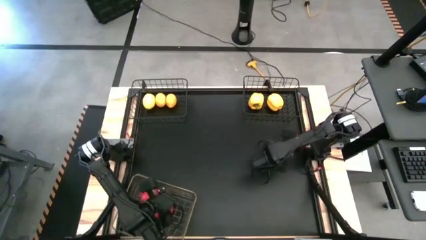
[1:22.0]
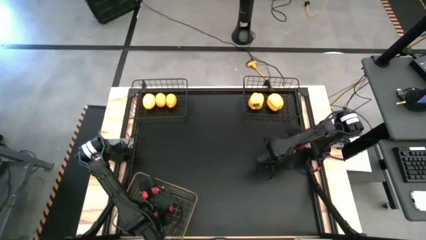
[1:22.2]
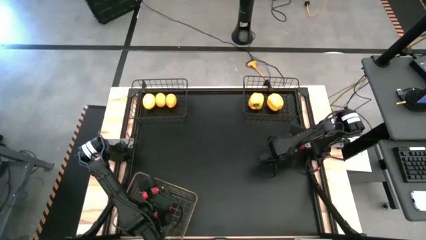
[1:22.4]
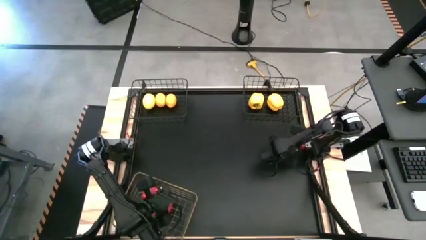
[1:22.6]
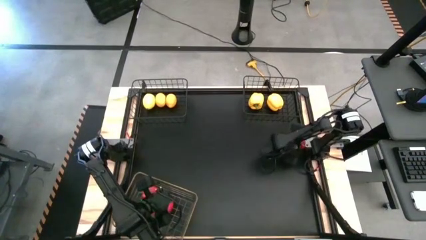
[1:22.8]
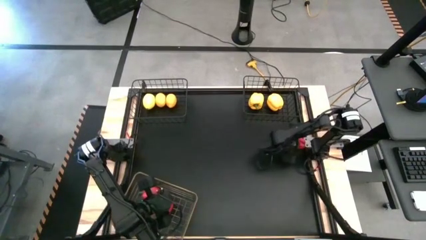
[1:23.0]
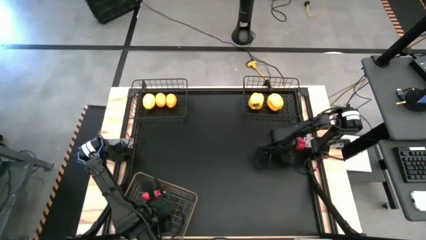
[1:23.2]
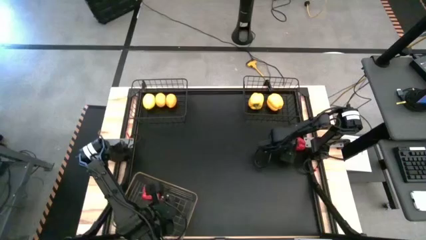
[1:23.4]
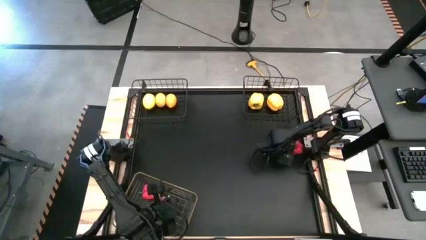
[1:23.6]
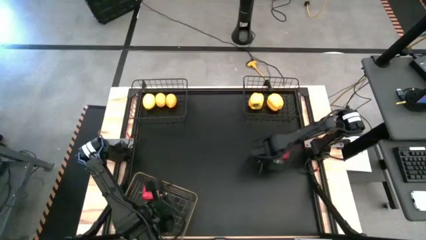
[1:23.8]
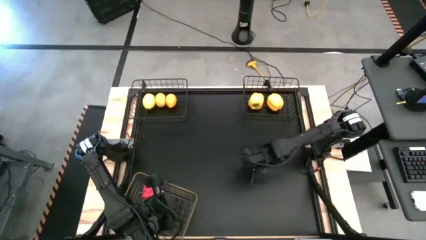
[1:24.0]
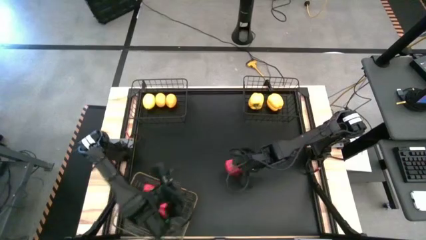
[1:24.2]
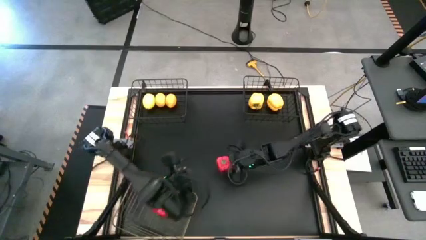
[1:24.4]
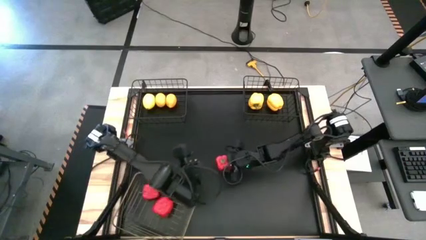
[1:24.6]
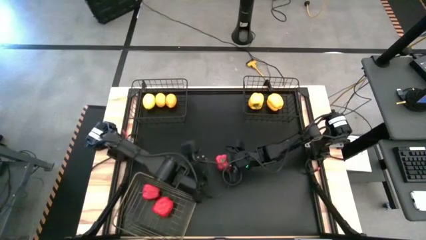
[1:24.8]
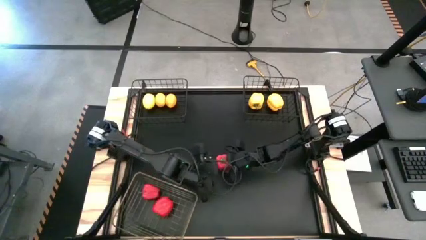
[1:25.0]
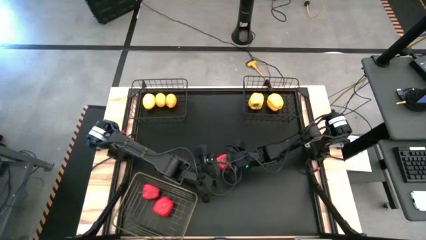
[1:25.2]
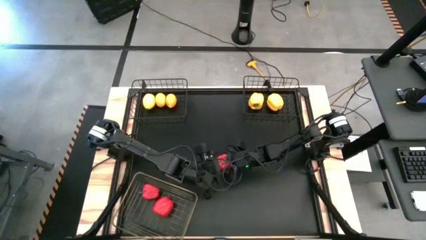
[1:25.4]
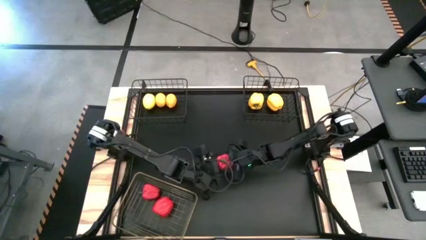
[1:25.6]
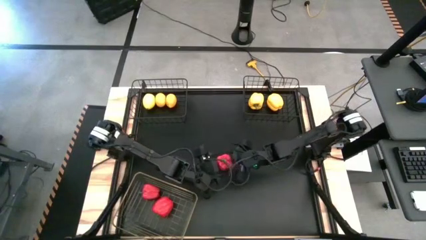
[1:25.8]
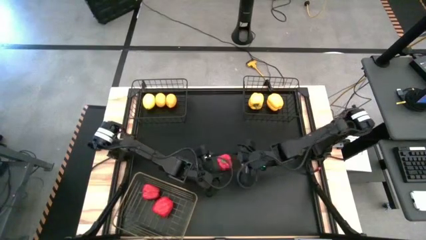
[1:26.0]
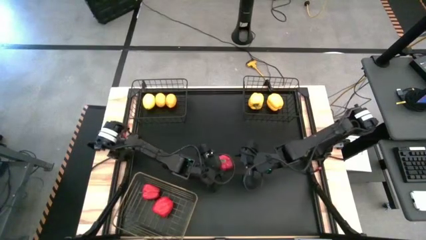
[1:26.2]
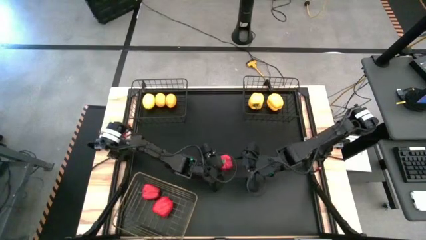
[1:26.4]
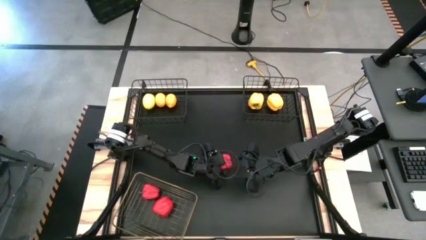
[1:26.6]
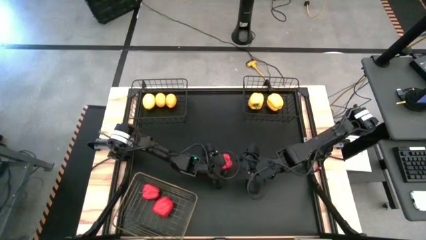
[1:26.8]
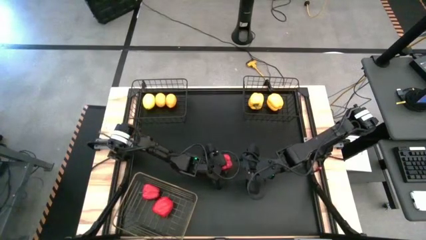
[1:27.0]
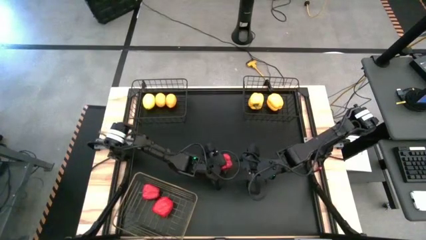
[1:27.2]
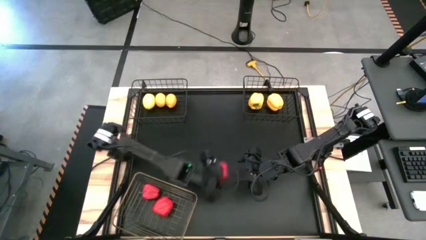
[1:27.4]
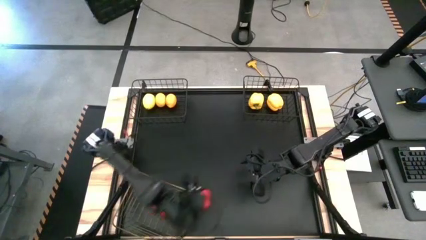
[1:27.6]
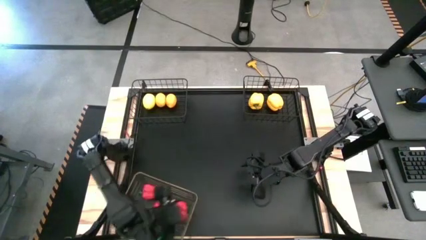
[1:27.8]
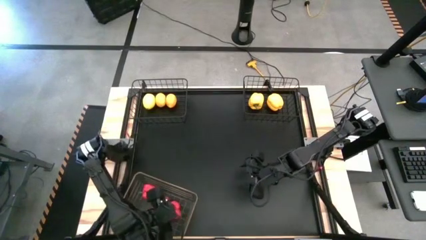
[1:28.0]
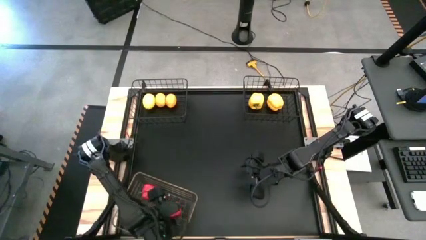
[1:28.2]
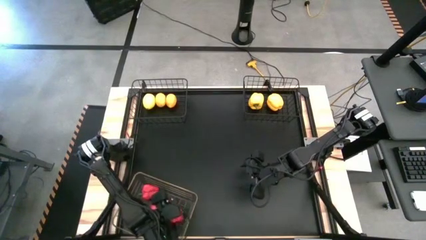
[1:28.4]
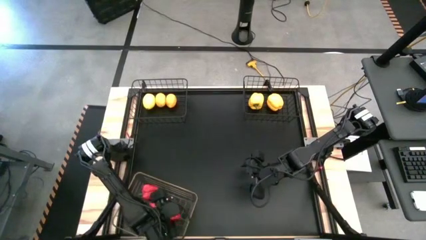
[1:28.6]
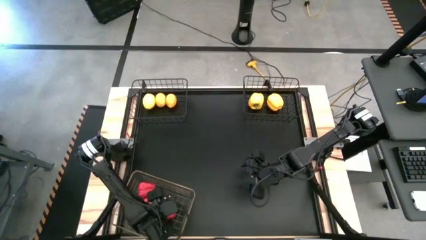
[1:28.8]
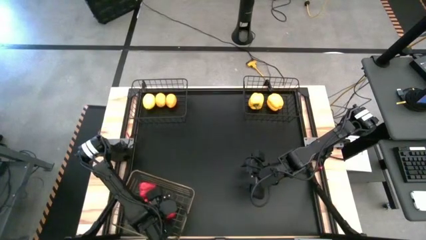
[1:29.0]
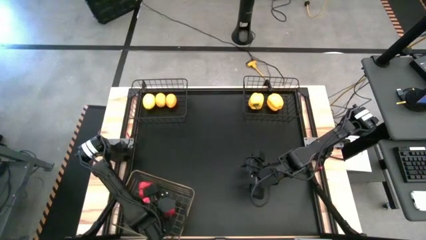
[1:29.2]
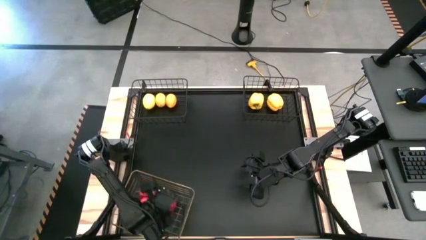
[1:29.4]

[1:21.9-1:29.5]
Task: Sort produce into baskets
Put the red bell pepper into the gold wire basket

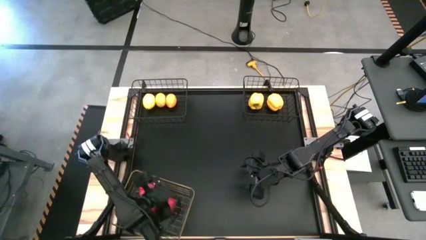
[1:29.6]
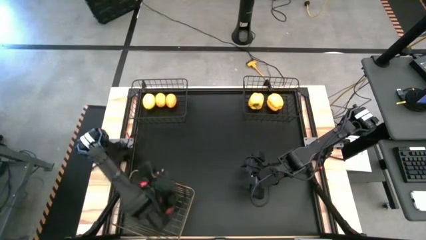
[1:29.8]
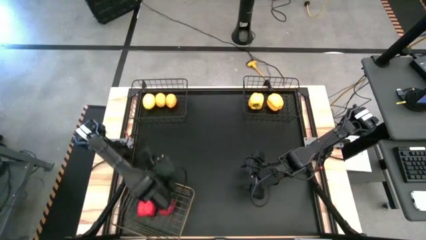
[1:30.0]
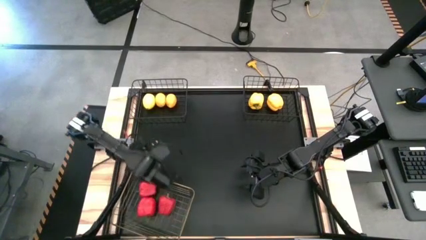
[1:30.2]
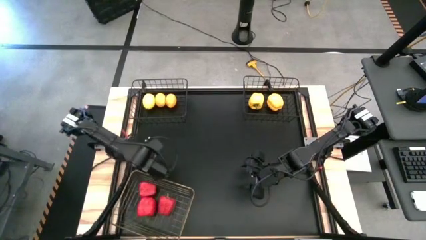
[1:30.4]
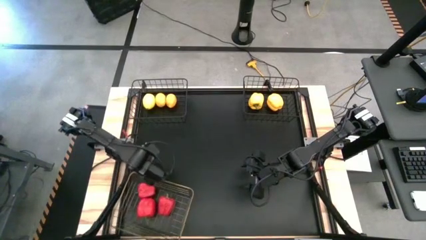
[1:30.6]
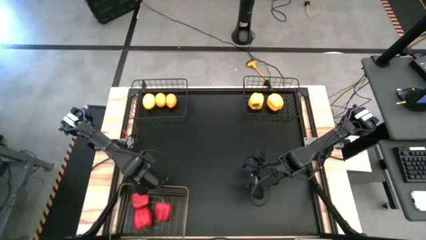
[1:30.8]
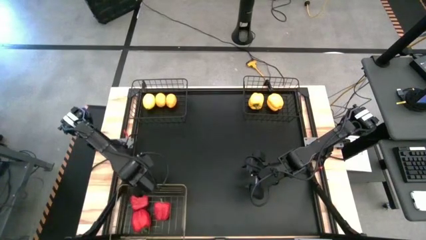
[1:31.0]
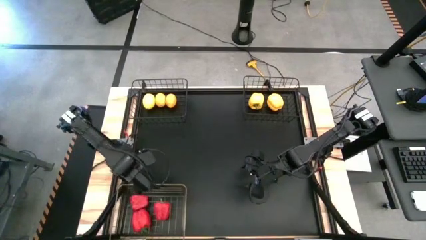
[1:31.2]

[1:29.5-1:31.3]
Adjust the gold wire basket

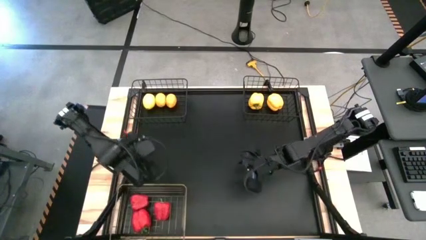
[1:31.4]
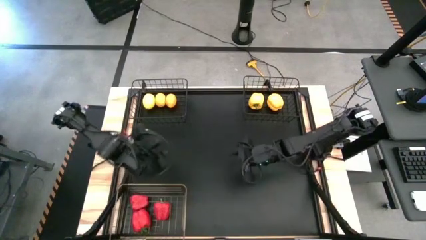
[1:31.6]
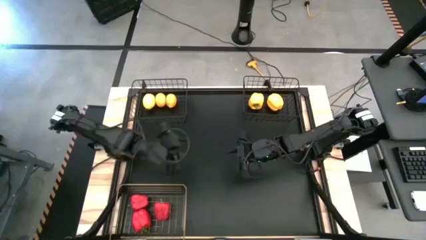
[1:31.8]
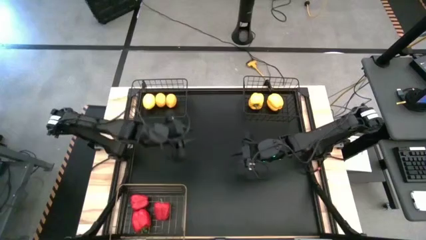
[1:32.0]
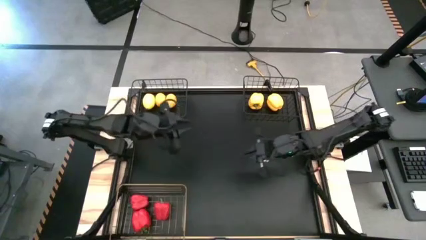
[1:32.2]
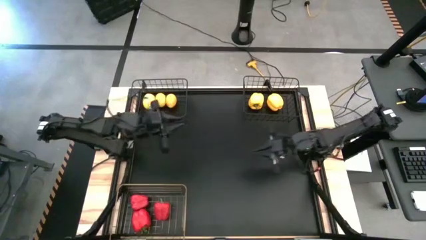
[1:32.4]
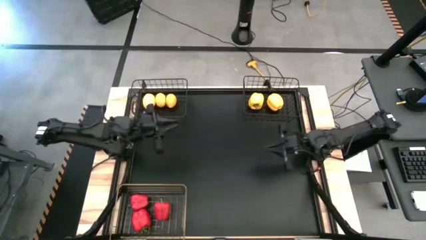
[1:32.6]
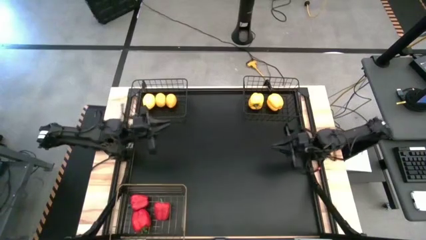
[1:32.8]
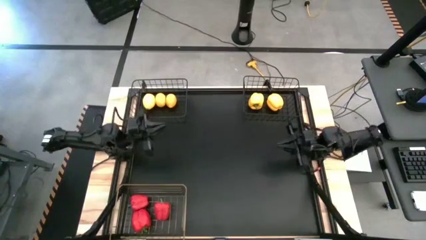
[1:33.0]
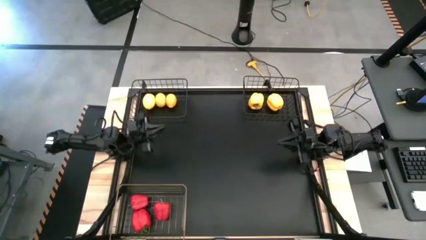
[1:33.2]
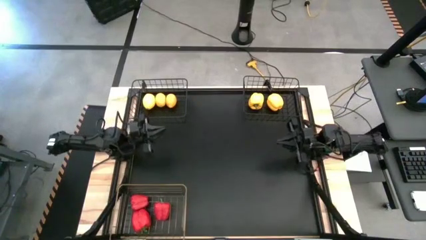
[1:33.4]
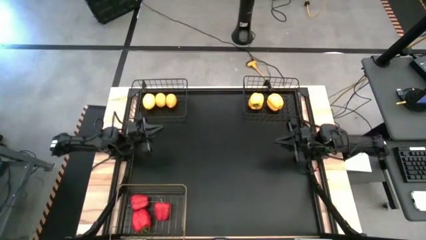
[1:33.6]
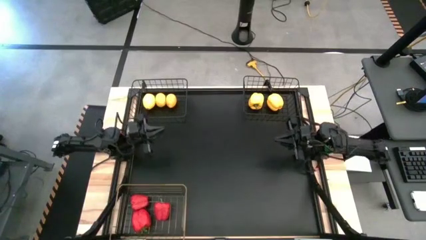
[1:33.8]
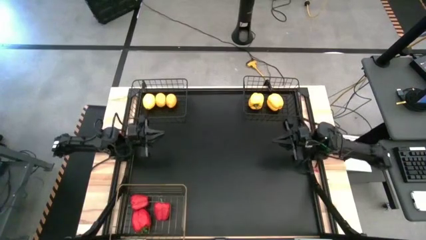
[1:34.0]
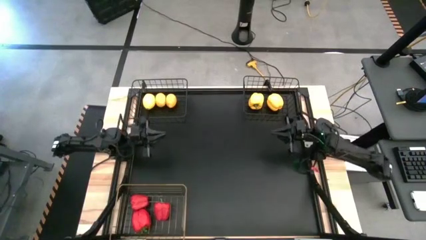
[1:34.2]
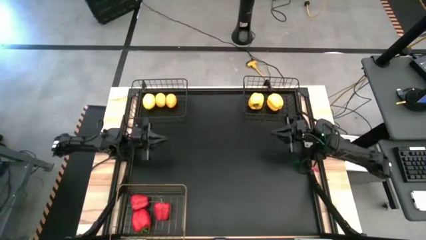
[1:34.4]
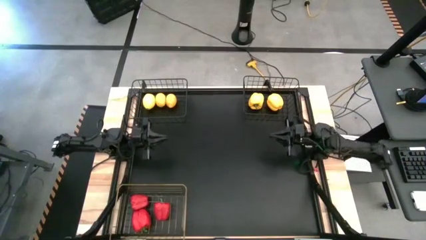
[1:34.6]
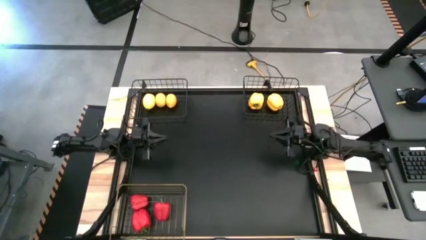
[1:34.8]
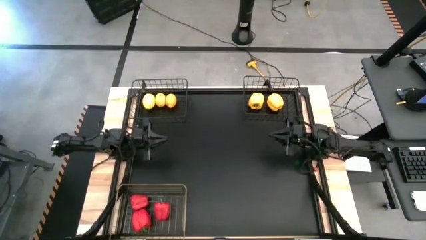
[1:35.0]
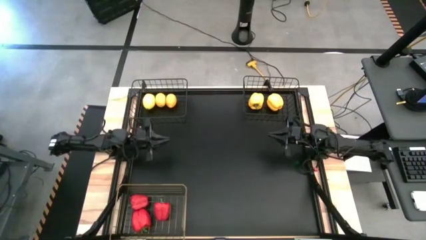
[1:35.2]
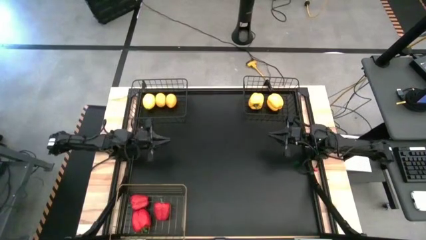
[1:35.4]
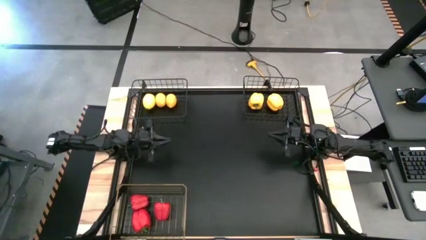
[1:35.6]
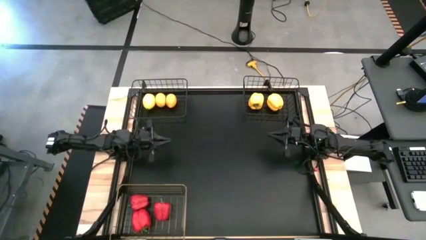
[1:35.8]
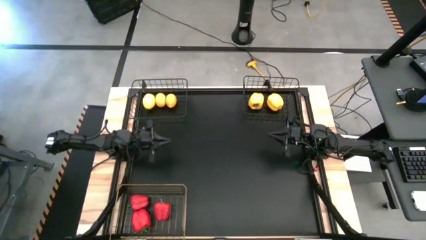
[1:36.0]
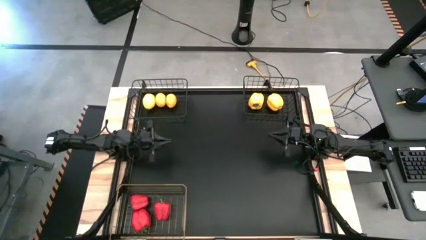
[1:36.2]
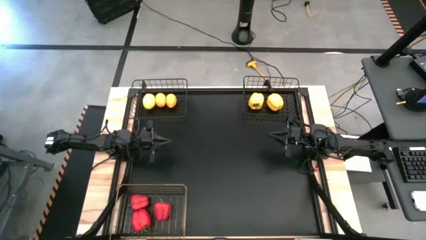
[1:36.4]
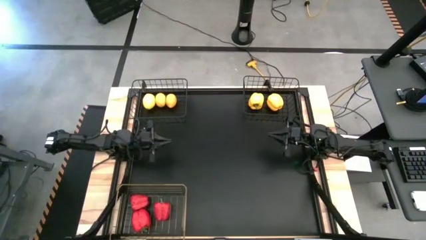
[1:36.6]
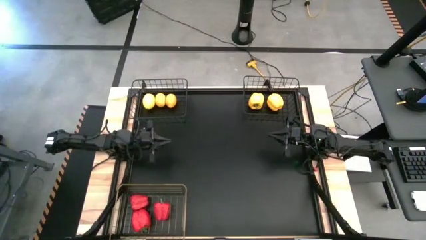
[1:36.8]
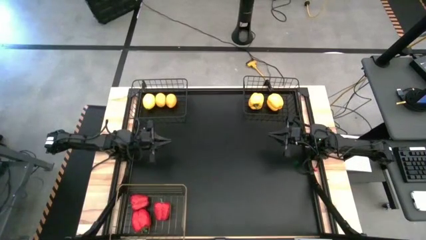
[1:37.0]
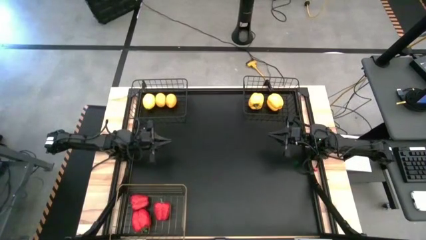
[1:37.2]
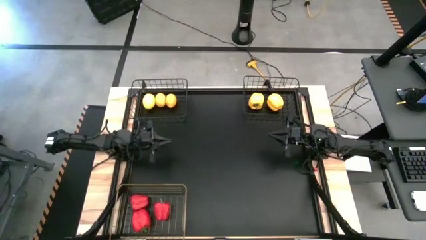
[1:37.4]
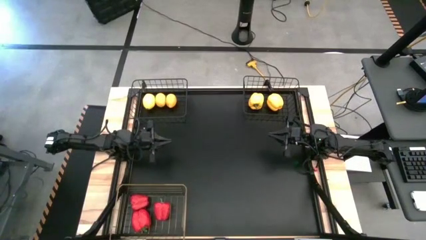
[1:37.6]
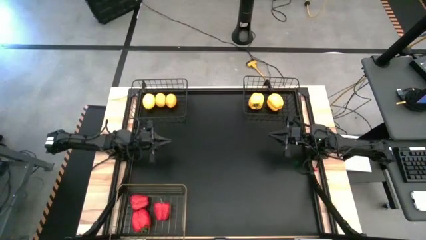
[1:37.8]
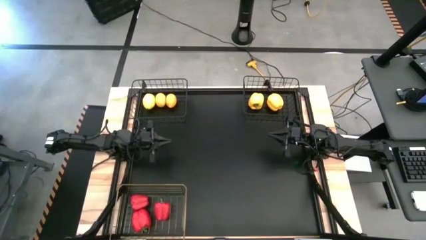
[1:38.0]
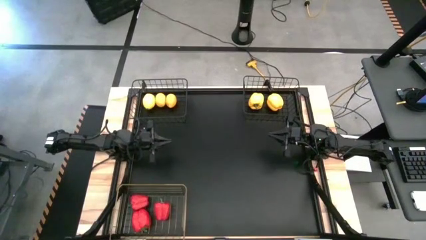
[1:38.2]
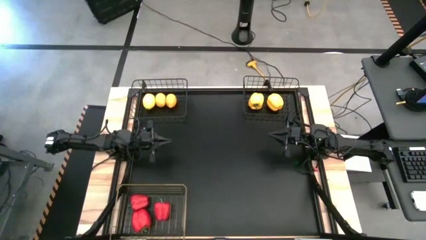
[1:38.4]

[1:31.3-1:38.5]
Return to Home Position
